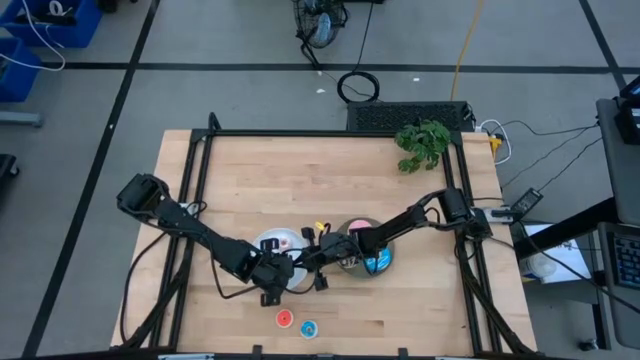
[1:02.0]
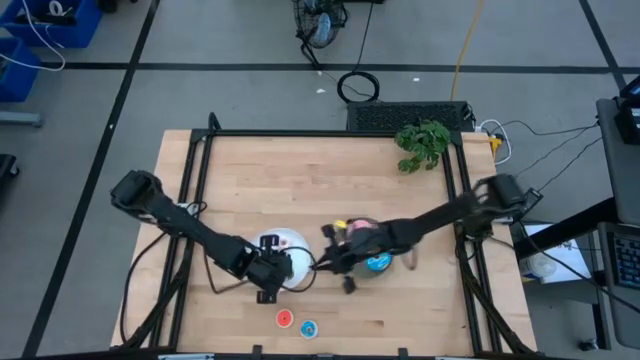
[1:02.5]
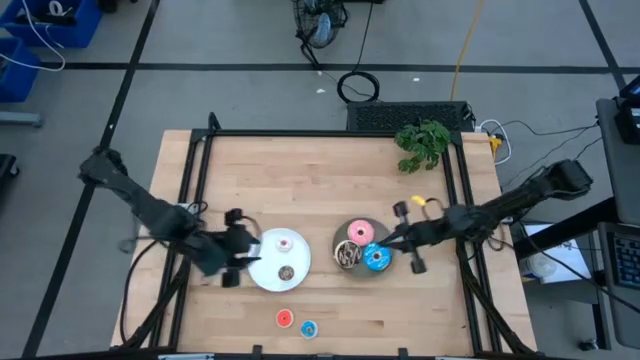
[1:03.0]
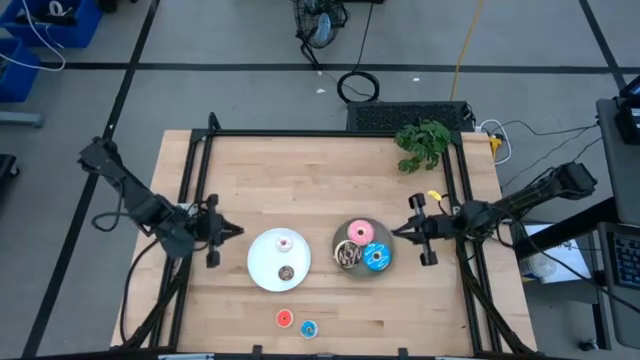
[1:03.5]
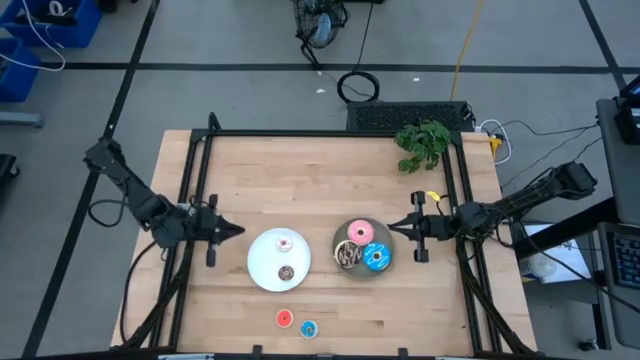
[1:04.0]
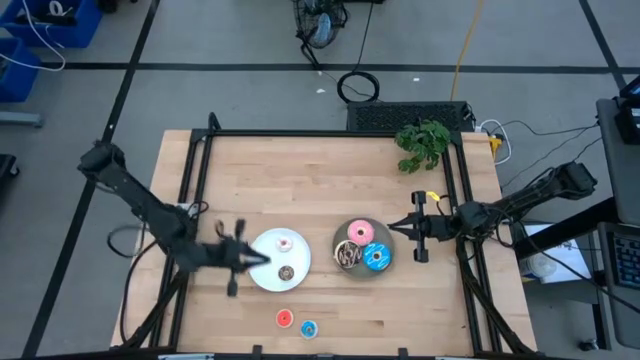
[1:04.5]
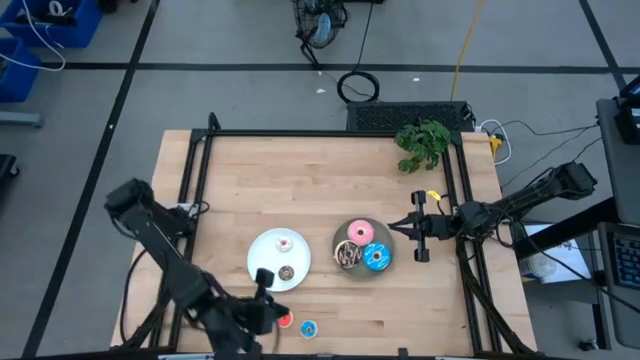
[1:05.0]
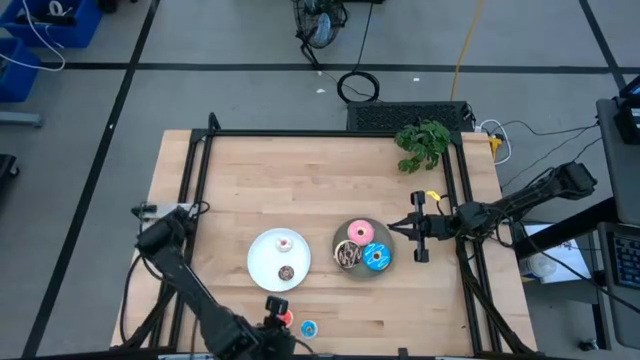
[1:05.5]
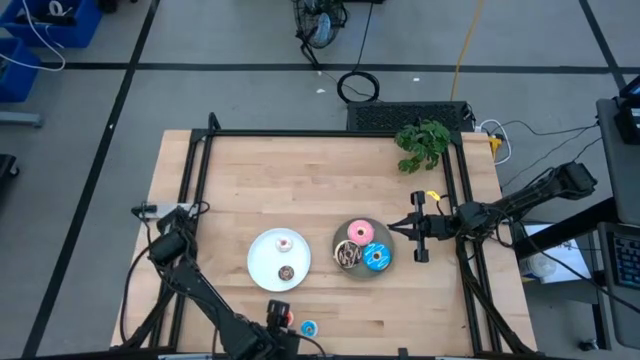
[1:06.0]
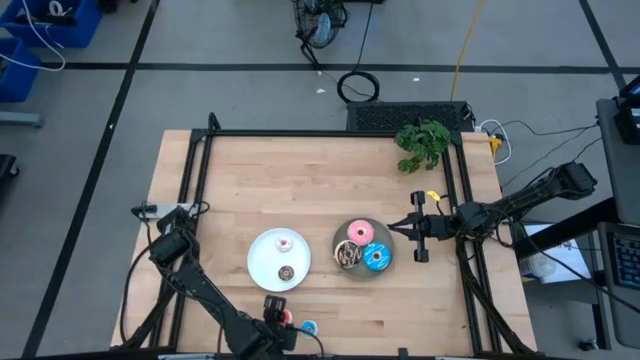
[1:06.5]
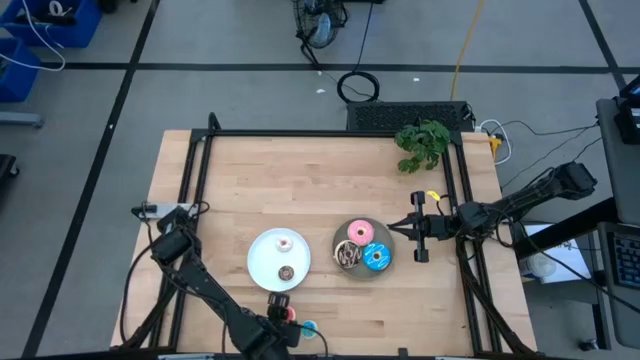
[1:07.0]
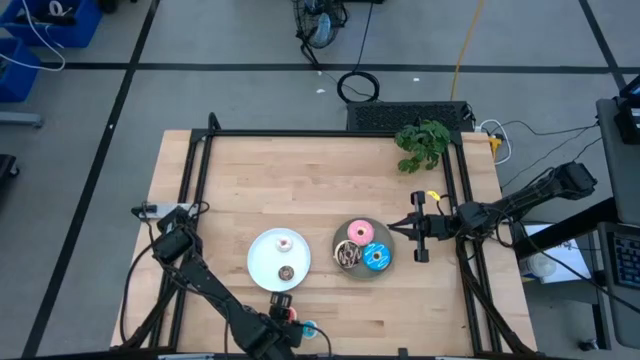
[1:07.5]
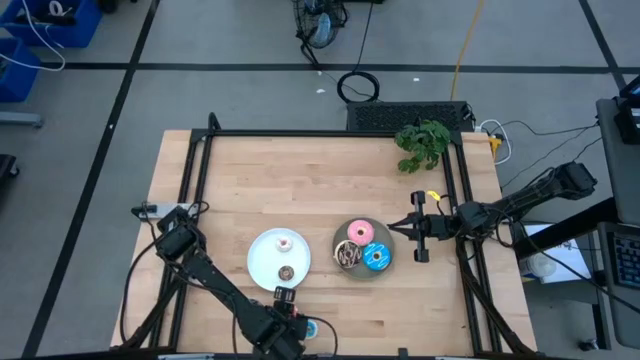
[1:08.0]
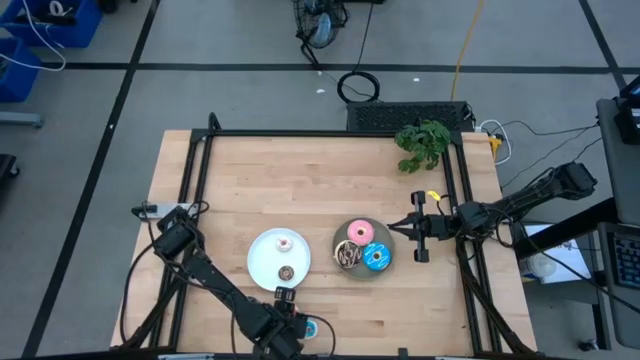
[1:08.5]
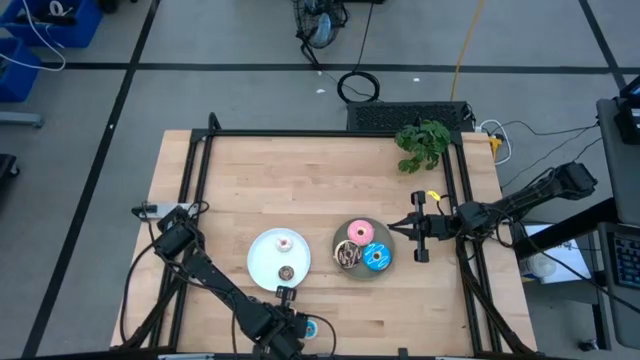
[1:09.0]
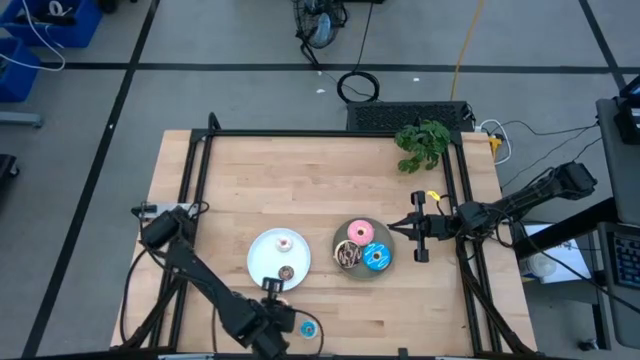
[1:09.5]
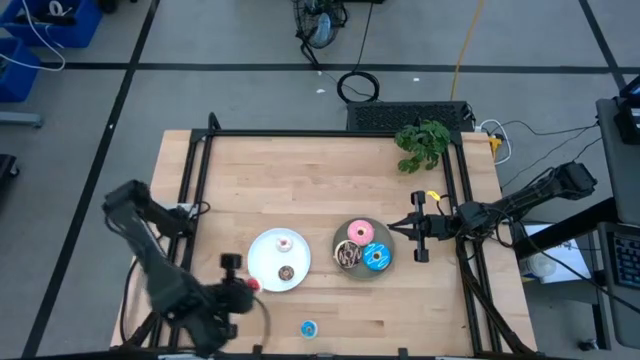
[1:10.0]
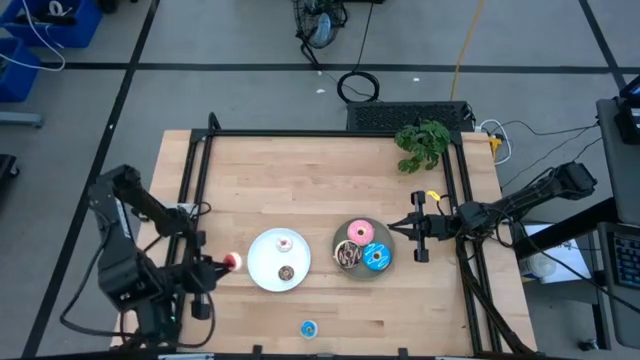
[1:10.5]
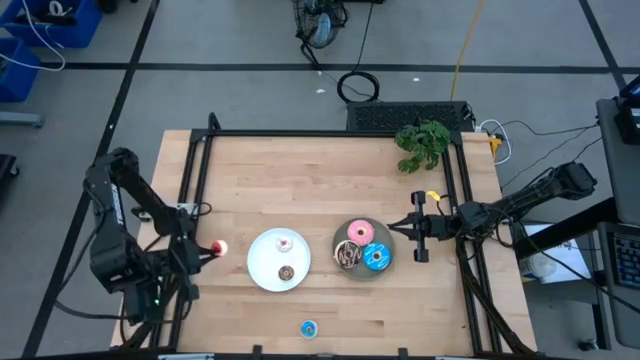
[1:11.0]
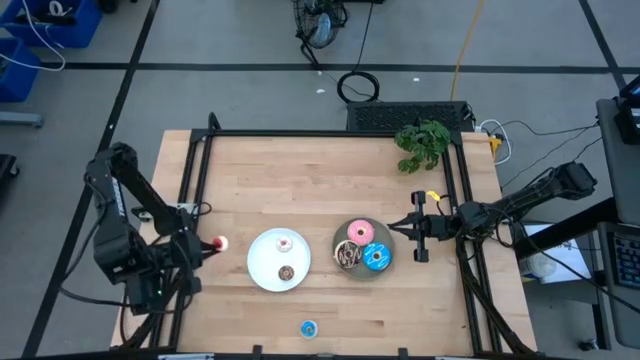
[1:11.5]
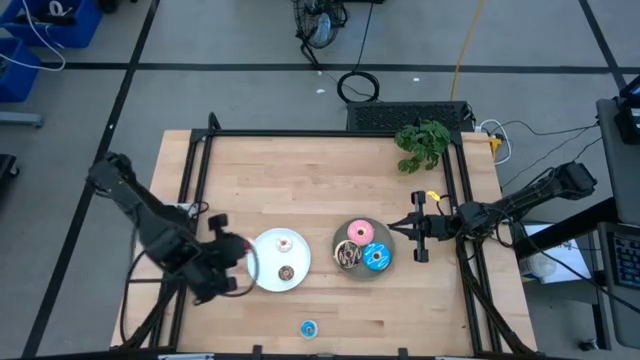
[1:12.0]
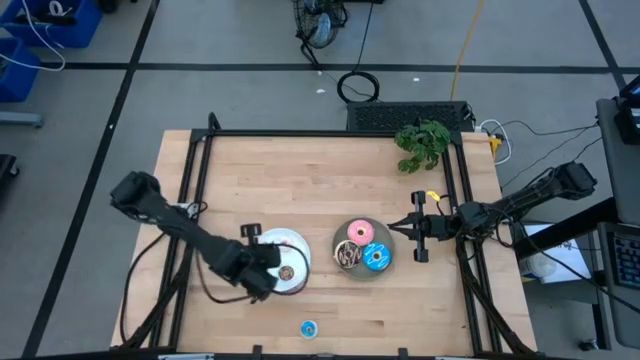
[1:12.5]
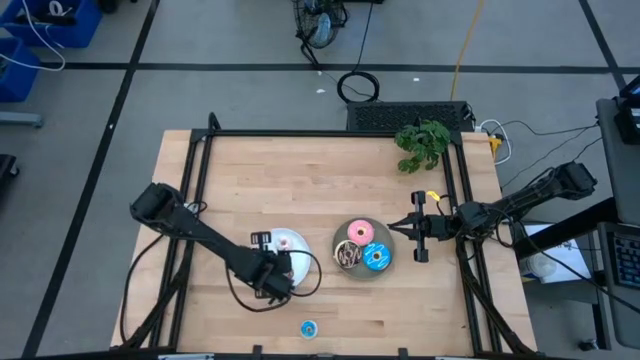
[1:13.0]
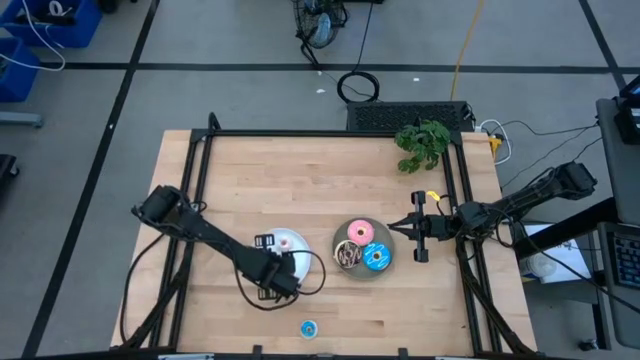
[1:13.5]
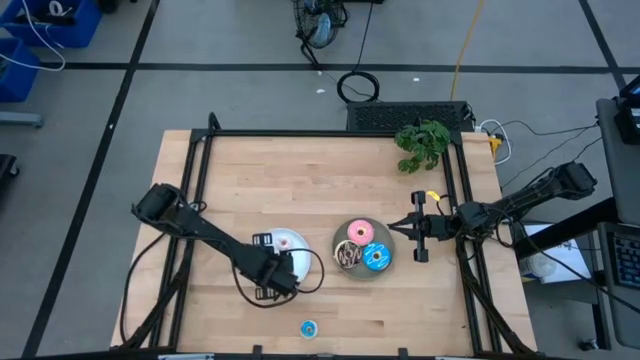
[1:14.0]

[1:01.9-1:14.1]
Task: Pick & Place donuts
Put the small orange donut on the white plate

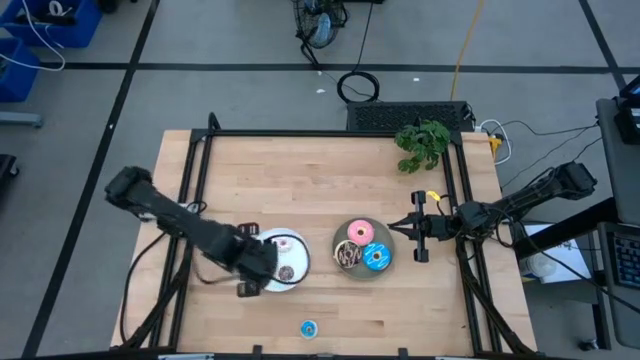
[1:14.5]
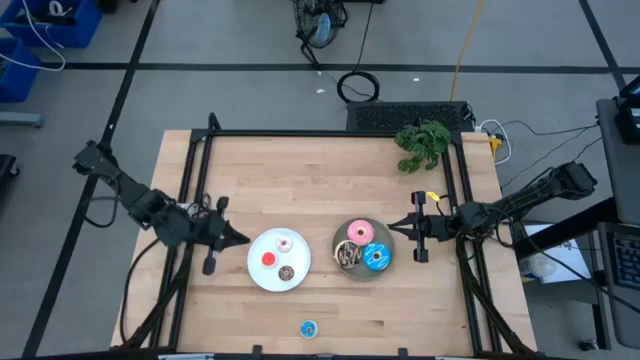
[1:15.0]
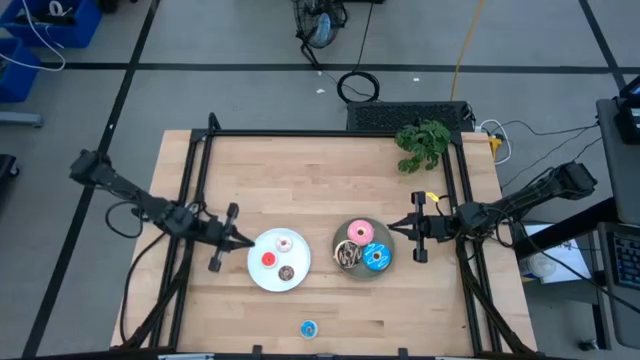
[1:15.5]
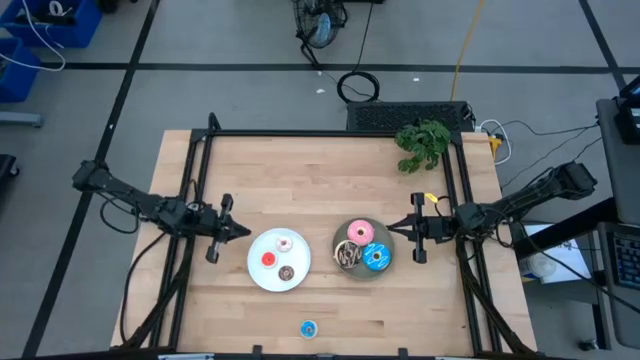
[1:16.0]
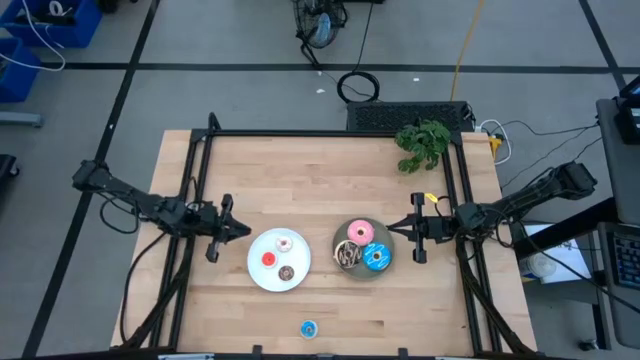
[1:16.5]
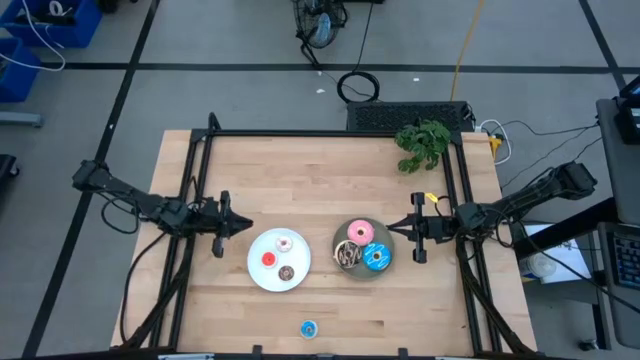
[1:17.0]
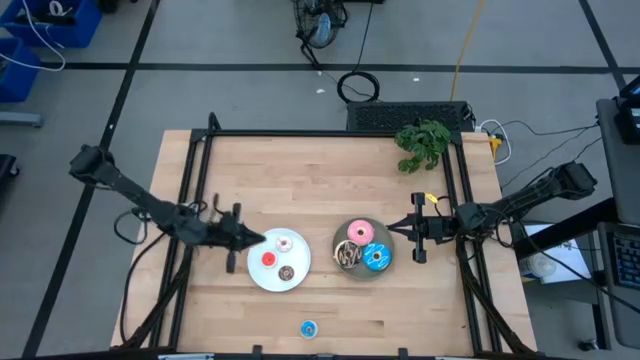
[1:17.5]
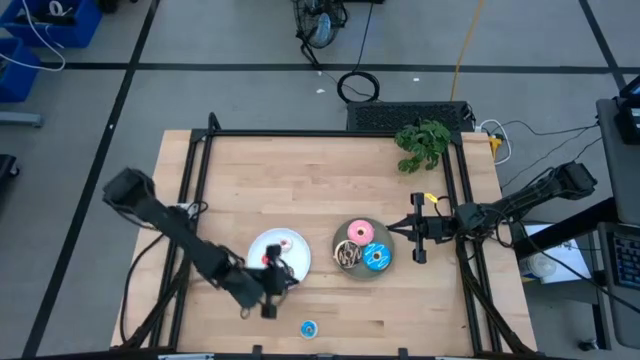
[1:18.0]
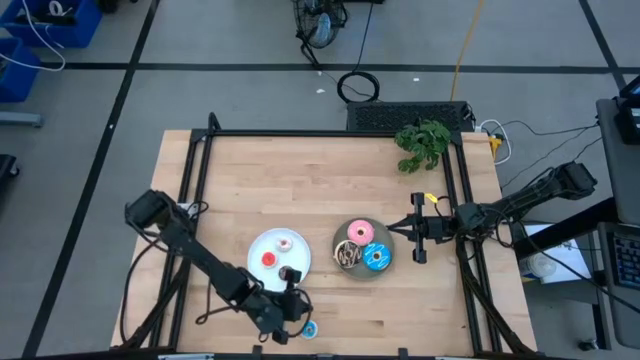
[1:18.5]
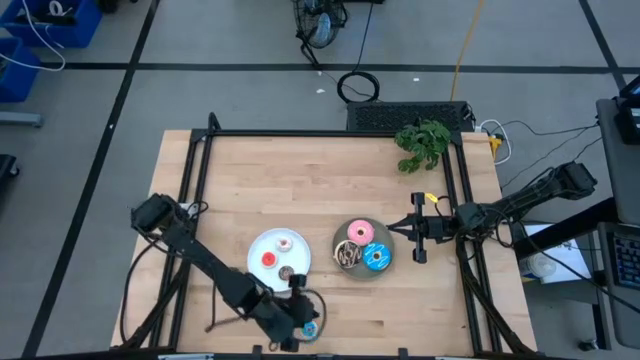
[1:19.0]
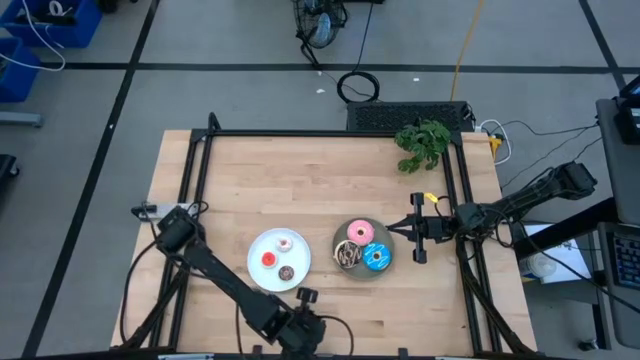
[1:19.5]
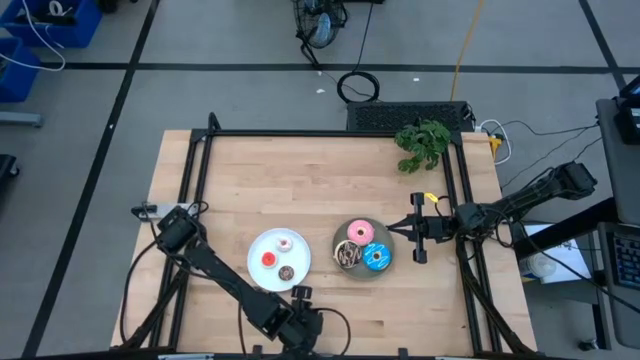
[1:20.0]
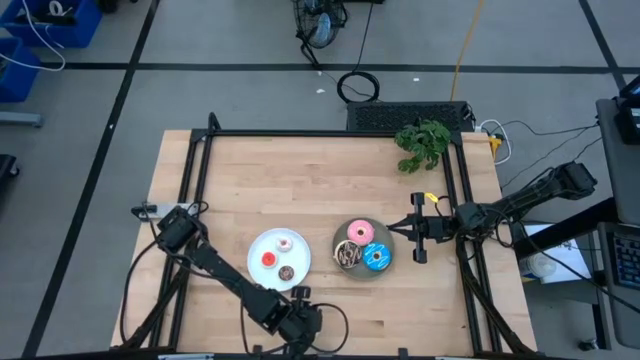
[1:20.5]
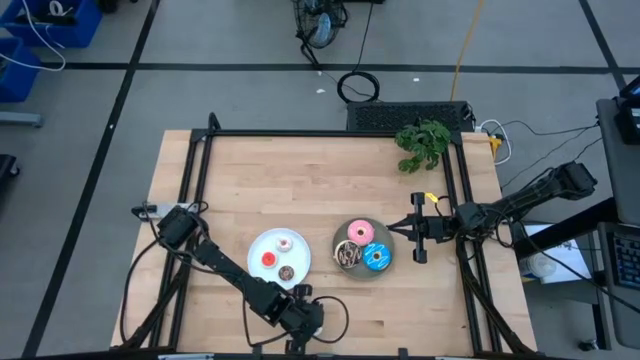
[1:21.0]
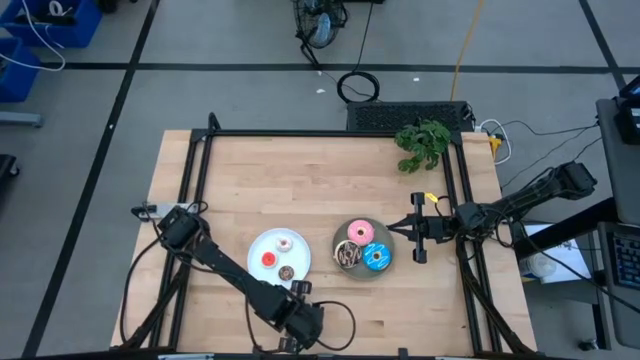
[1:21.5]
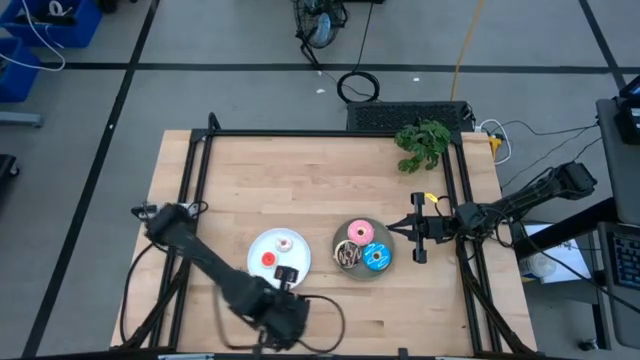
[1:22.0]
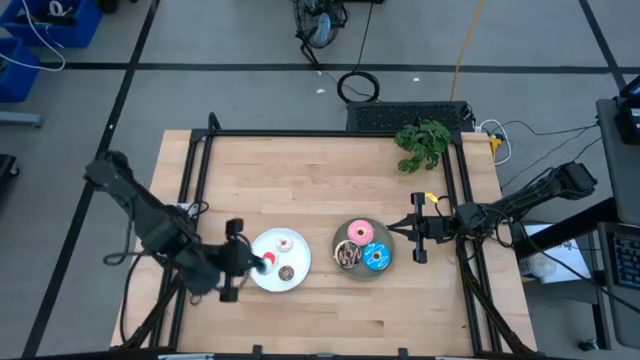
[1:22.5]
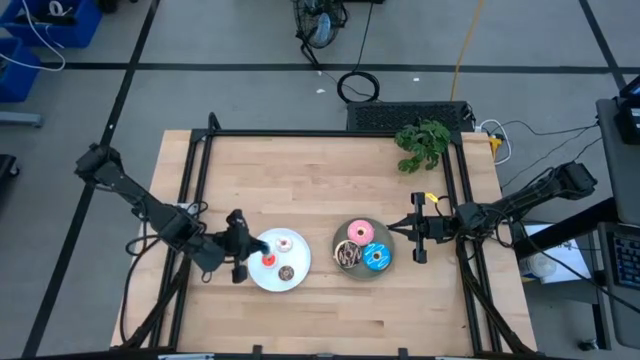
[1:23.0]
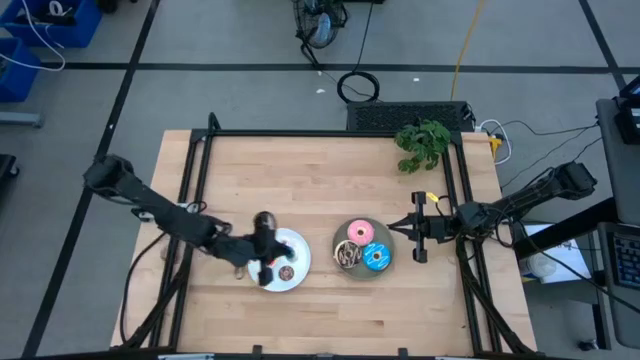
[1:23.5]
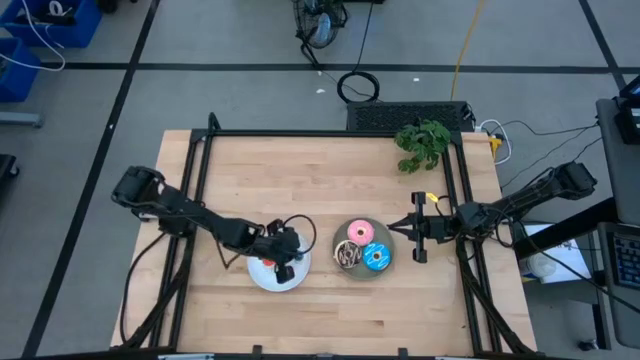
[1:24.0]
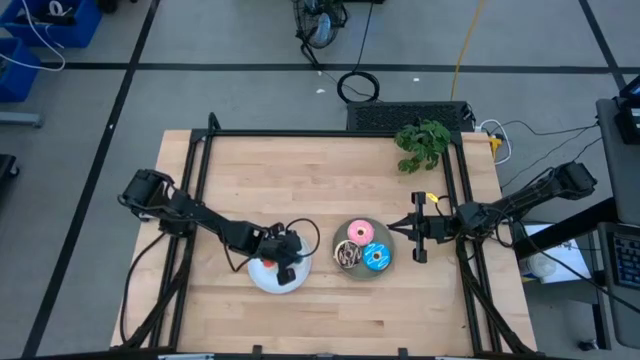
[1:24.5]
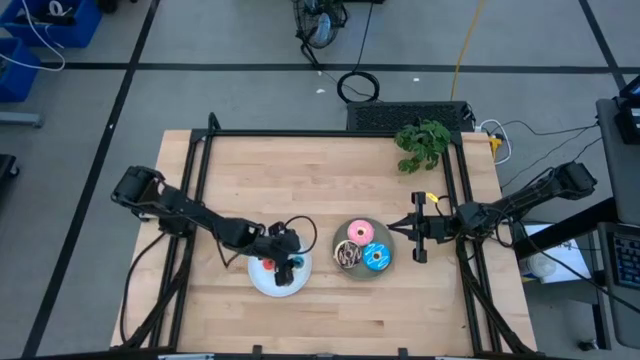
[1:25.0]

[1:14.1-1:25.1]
Put the small blue donut on the white plate
